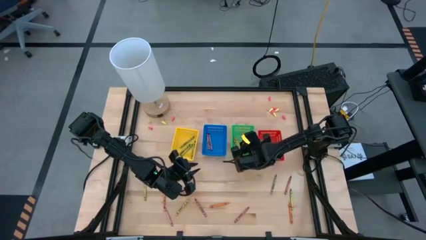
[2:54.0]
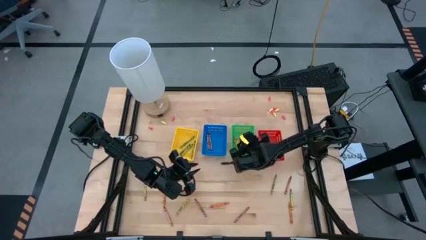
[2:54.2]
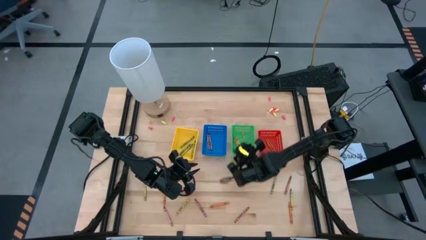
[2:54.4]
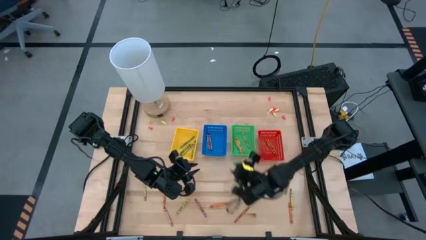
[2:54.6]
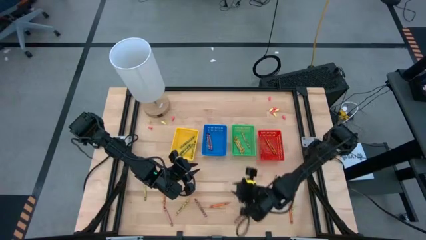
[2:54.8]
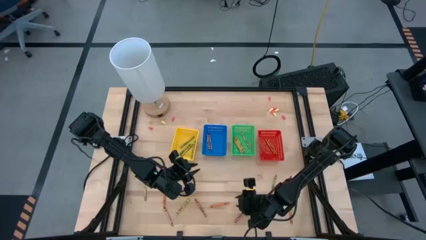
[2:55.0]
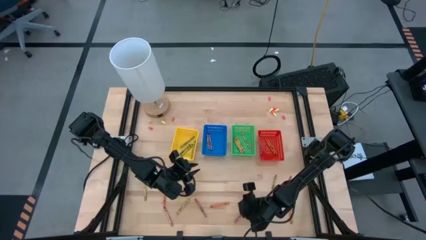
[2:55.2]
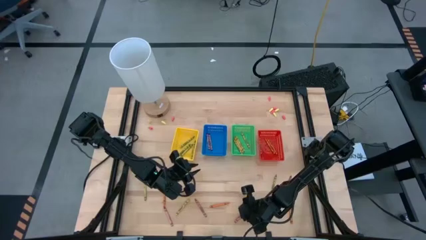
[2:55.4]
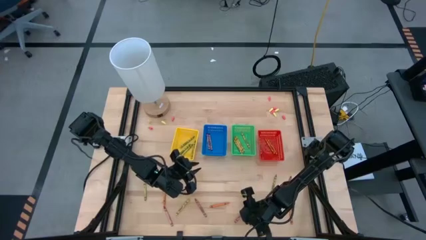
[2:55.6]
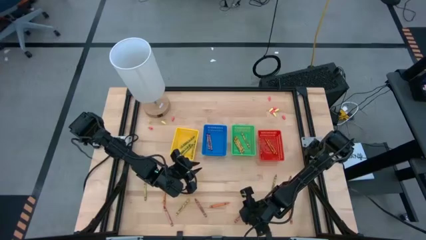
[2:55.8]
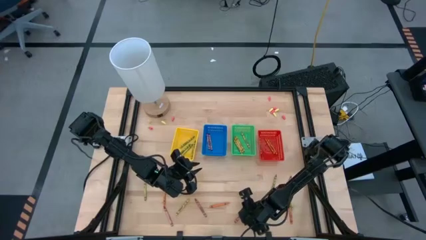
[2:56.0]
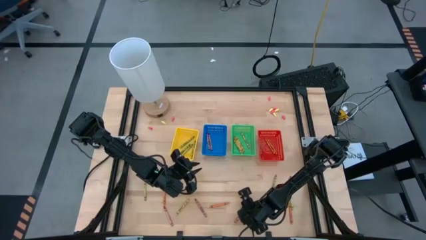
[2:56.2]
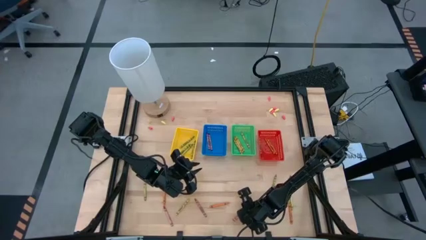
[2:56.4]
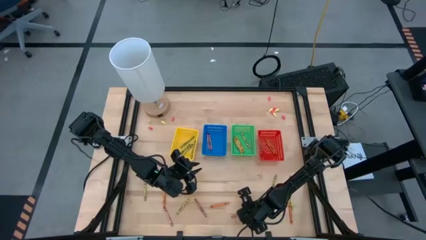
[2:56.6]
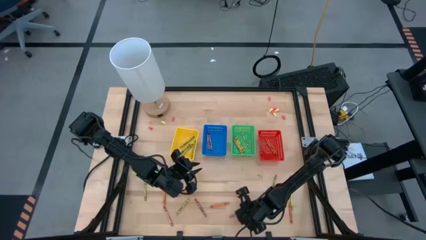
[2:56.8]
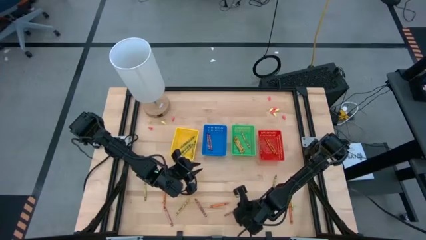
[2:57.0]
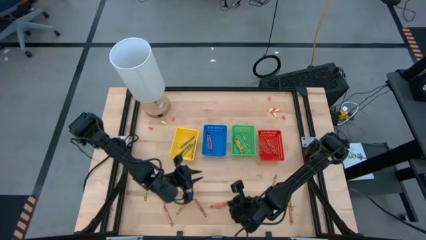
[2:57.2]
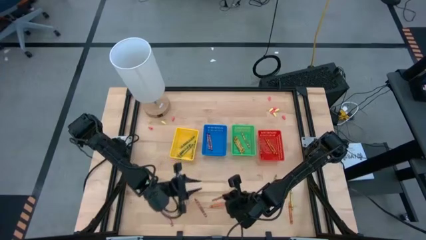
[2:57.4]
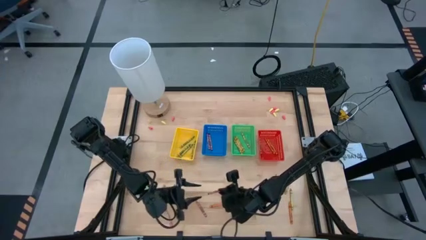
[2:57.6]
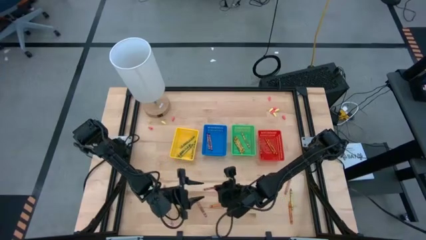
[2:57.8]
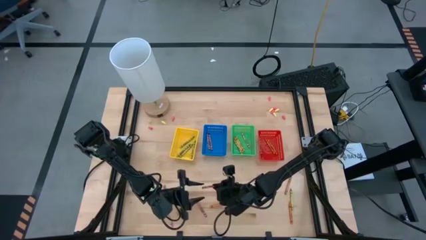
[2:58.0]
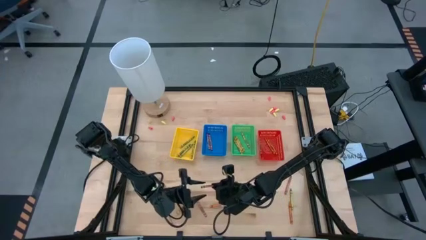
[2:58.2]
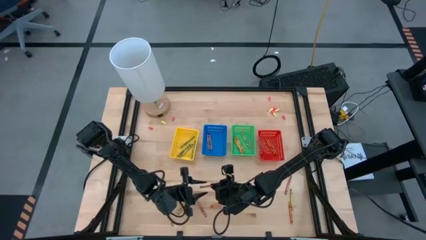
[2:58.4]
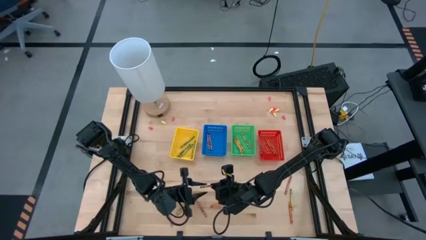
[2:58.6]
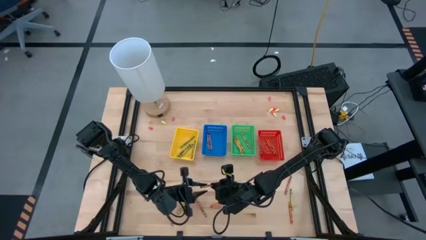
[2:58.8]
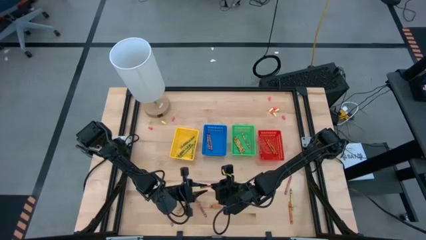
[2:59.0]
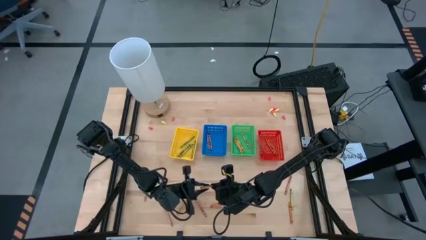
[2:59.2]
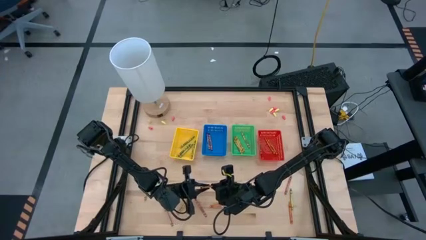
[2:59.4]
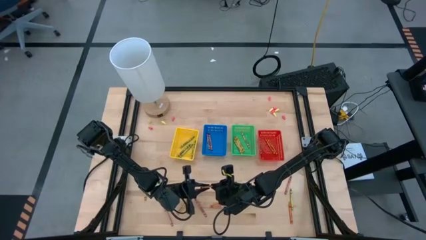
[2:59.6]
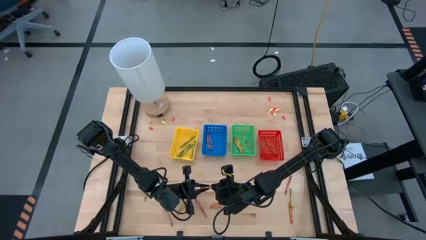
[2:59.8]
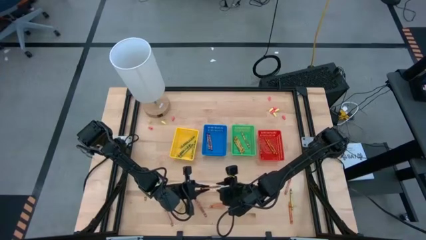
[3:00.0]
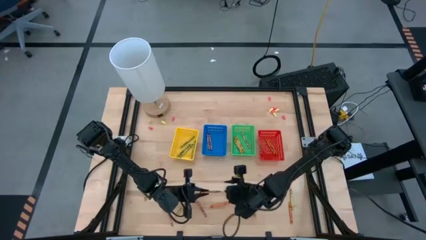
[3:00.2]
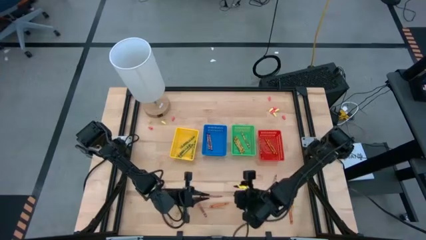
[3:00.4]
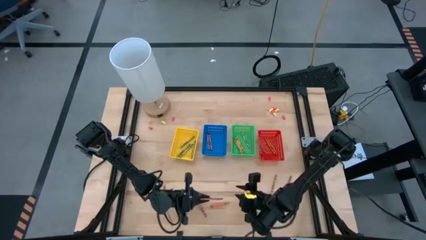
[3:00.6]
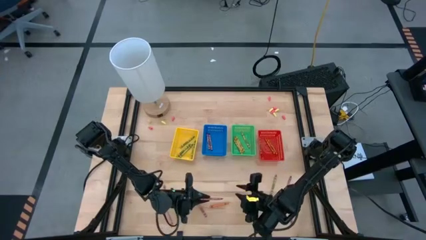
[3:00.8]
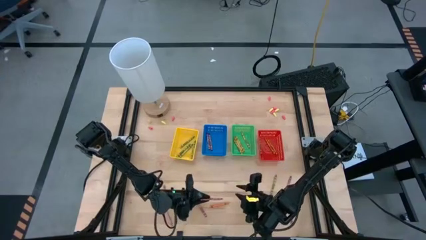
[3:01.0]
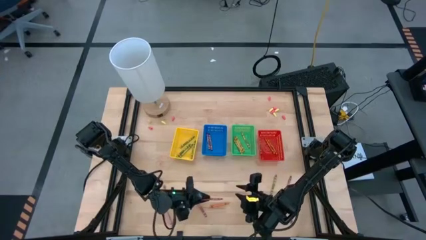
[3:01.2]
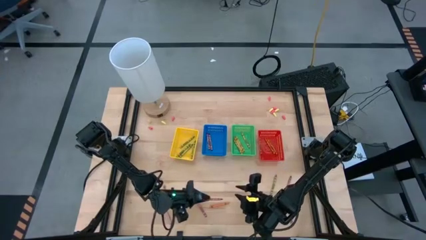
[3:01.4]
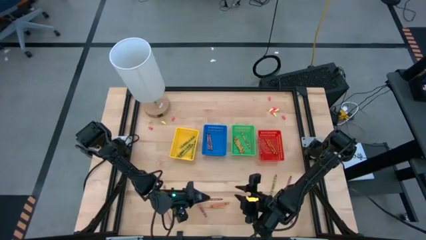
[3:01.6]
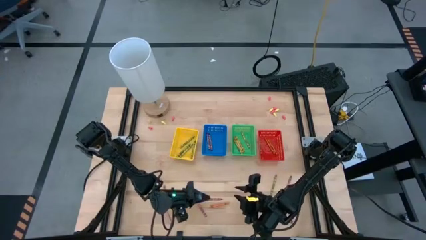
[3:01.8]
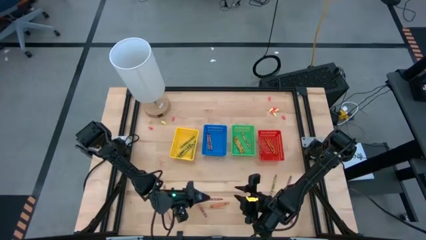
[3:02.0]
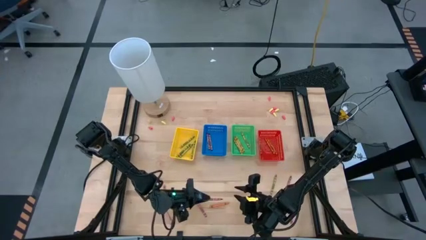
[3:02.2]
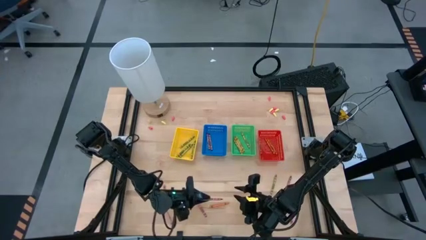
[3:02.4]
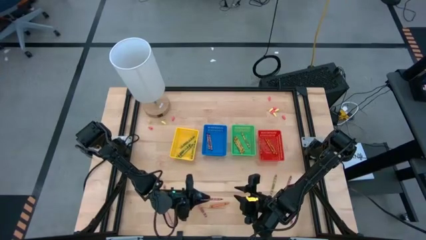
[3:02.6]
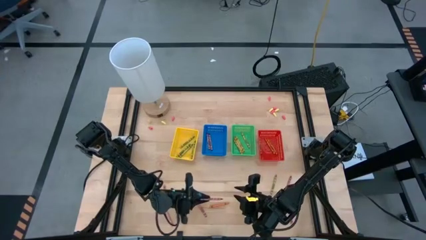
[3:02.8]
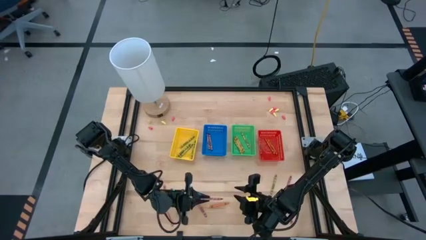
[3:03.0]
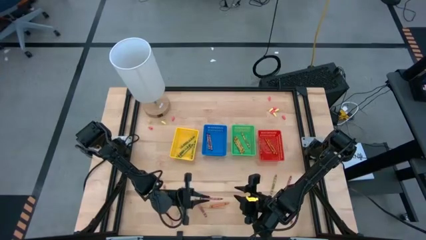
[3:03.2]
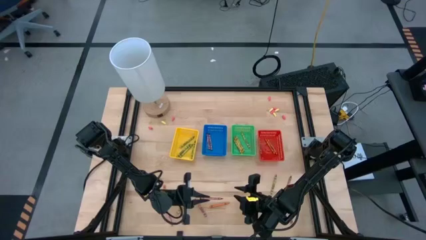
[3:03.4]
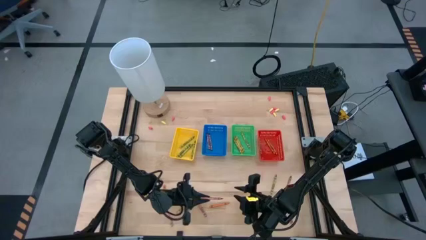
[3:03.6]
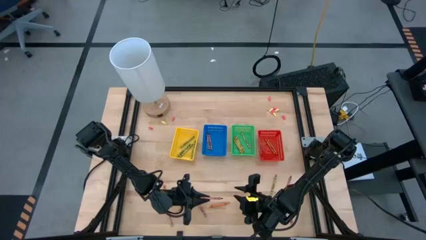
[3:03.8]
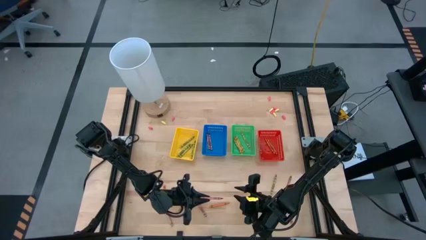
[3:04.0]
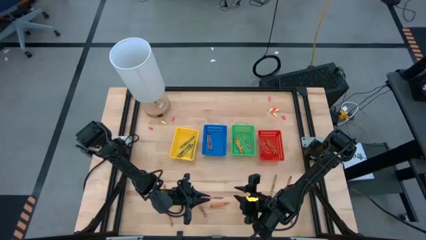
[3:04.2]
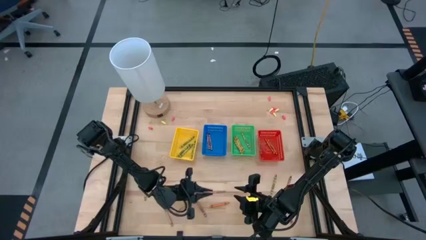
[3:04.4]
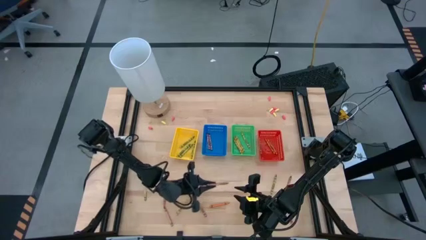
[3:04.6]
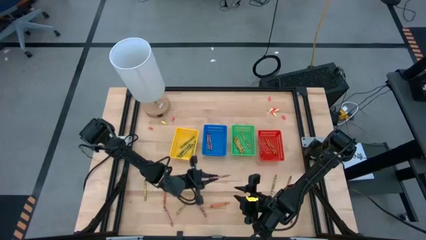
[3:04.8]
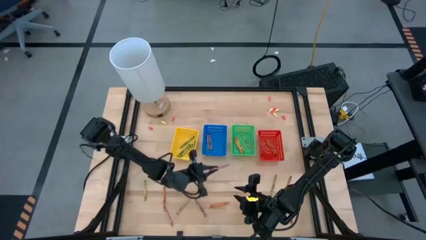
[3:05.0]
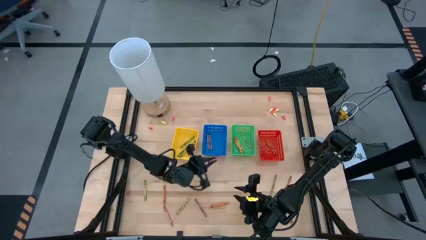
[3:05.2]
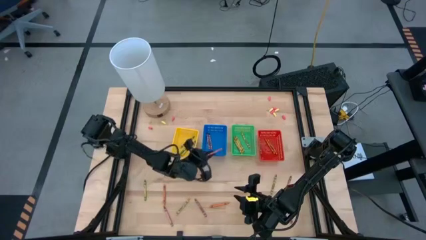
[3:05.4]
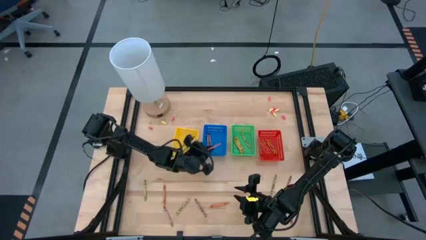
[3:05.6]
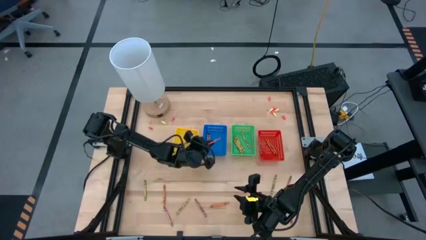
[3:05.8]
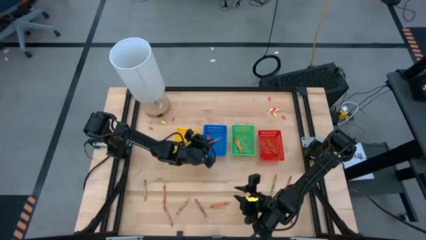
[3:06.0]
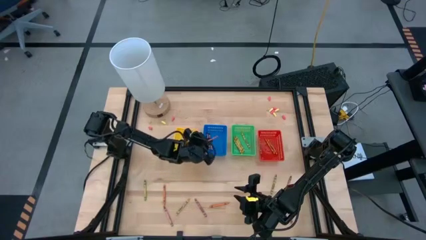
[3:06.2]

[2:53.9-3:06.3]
Task: Sort crayons
Put the red crayon into the blue bin

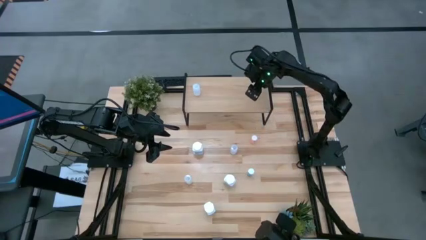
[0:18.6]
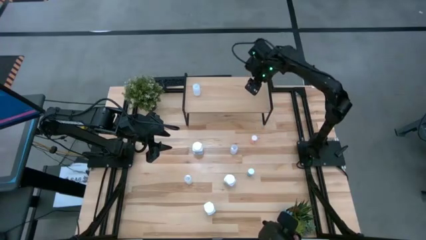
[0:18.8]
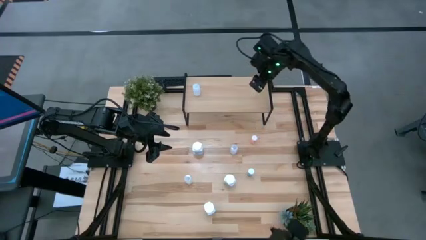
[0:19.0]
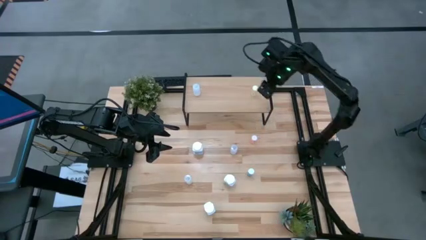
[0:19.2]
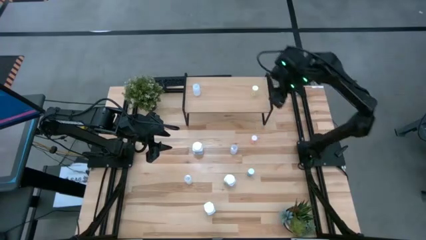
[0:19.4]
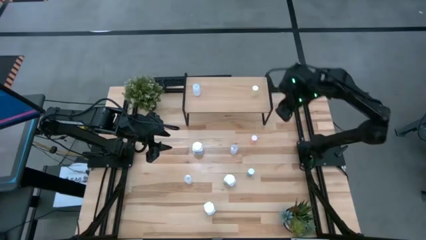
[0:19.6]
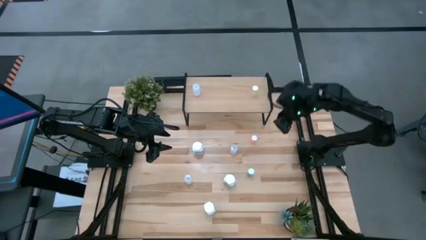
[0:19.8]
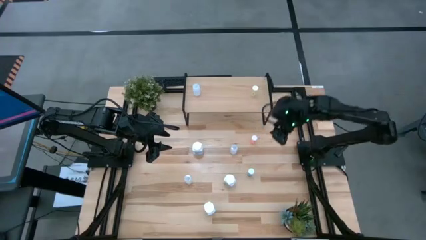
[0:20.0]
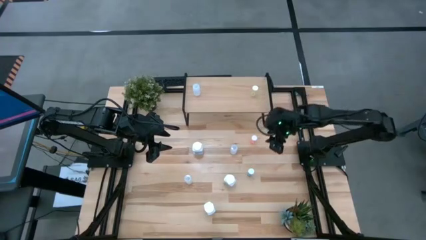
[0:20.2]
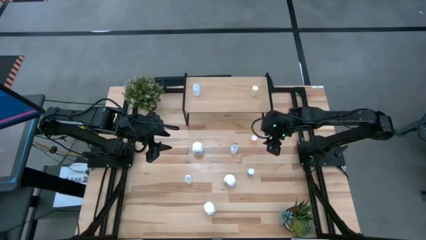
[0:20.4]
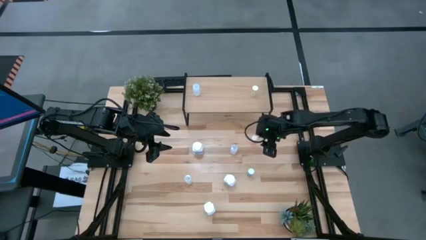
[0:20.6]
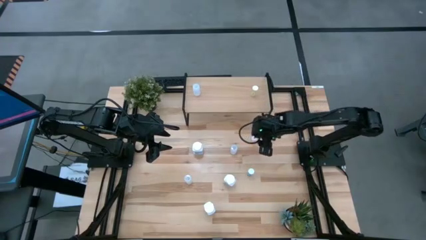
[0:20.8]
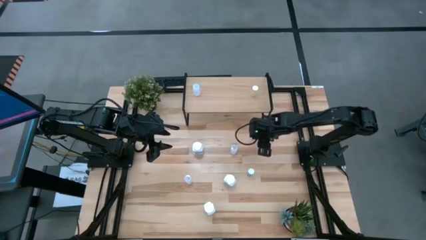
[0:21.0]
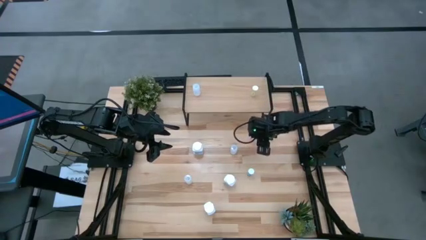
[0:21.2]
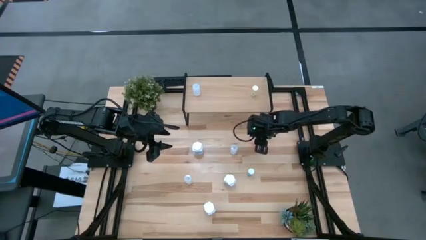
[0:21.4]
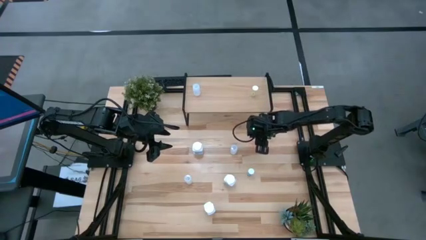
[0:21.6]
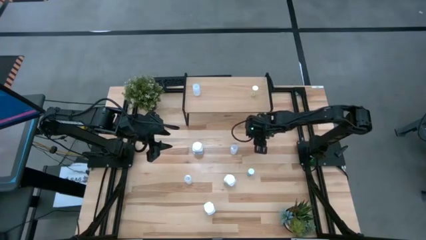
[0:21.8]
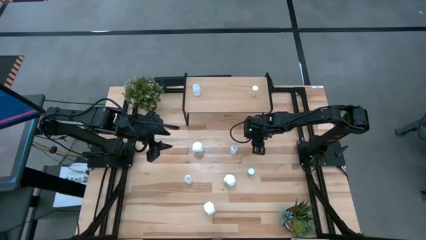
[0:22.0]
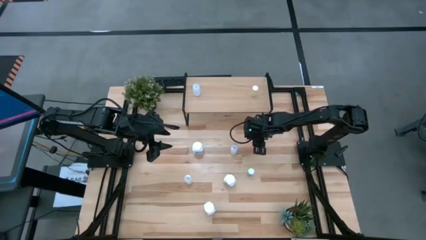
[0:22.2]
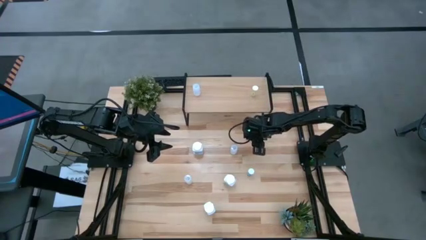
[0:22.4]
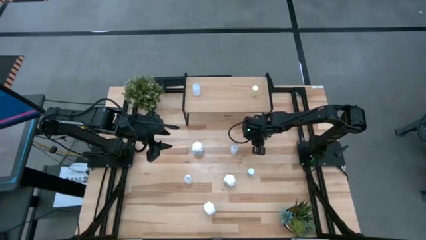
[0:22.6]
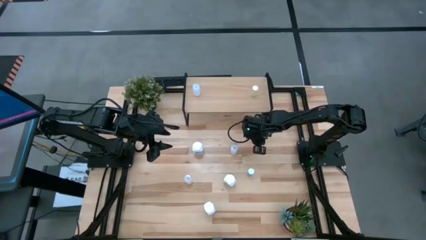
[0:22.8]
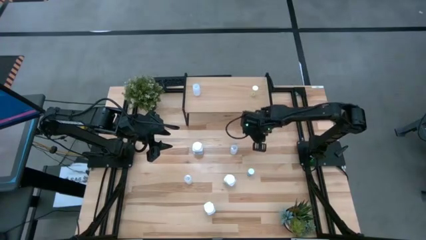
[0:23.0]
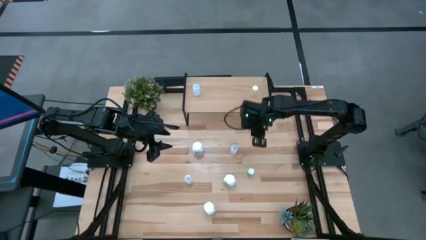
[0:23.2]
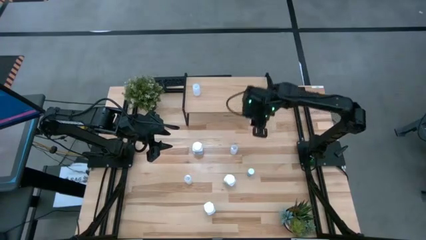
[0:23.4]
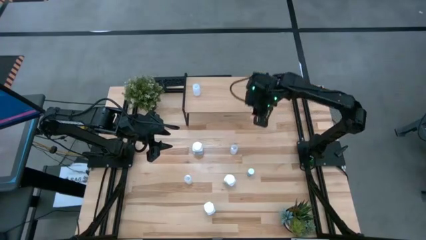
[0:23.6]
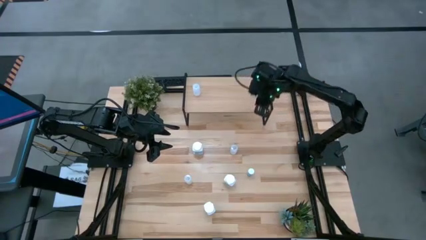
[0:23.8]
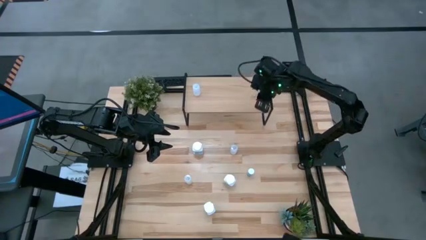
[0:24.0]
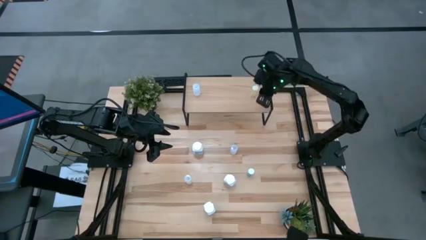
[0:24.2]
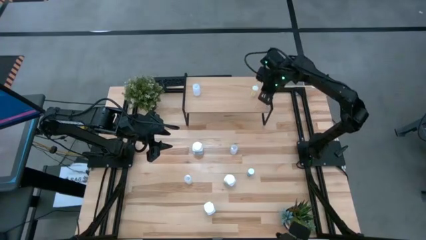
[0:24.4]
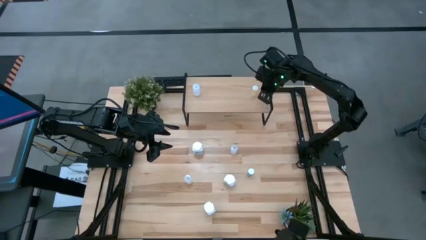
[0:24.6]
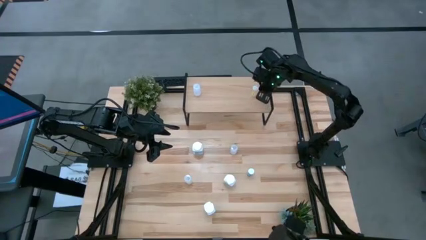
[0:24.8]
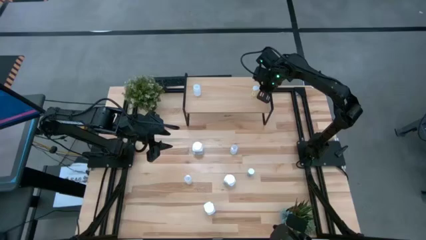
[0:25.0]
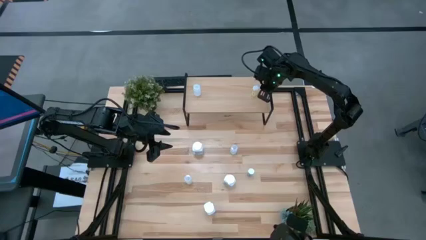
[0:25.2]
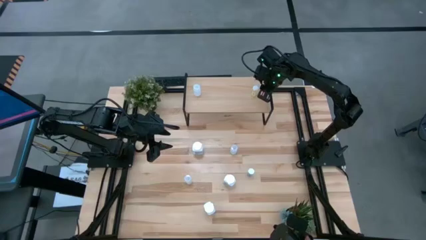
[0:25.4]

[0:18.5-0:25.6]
Task: Pick and place medicine bottles onto shelf by color
Put the pink transparent pill bottle on the shelf
